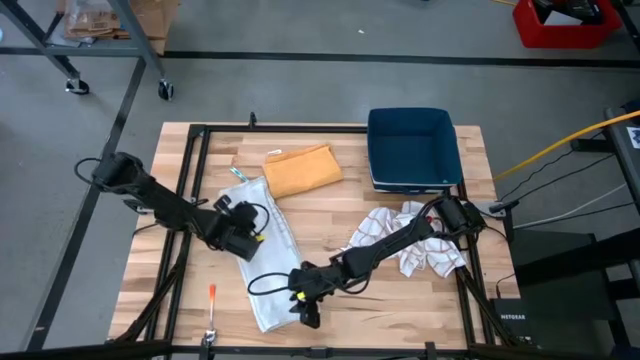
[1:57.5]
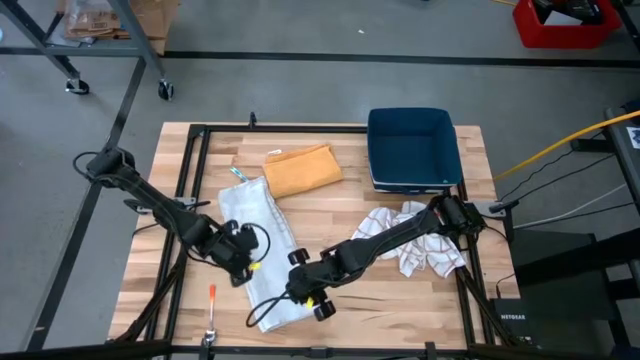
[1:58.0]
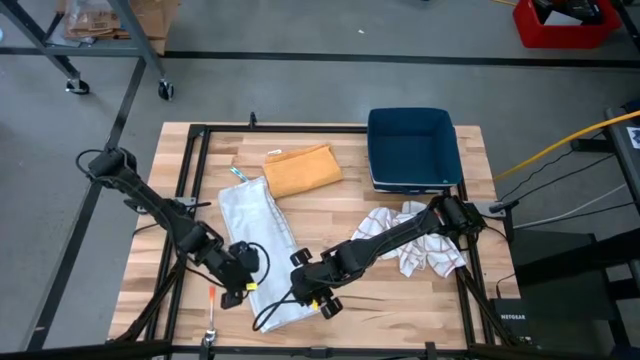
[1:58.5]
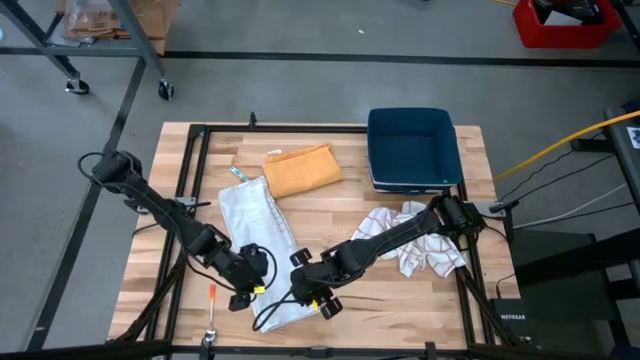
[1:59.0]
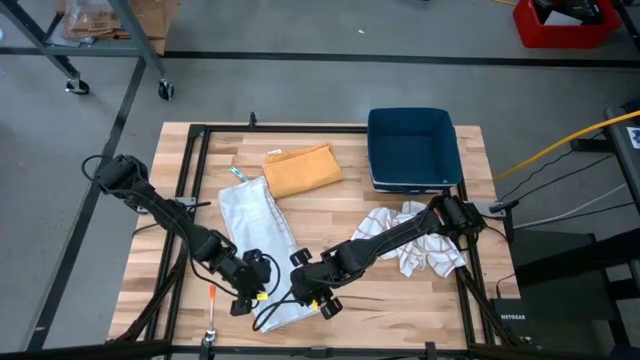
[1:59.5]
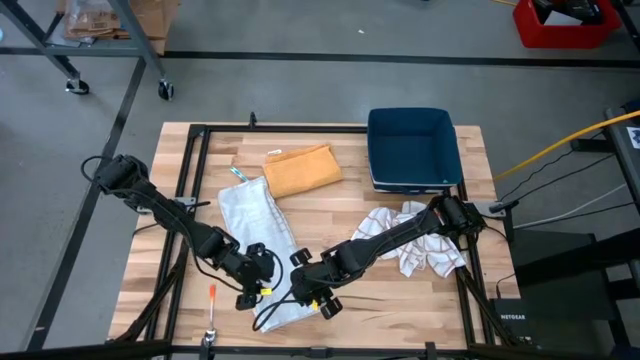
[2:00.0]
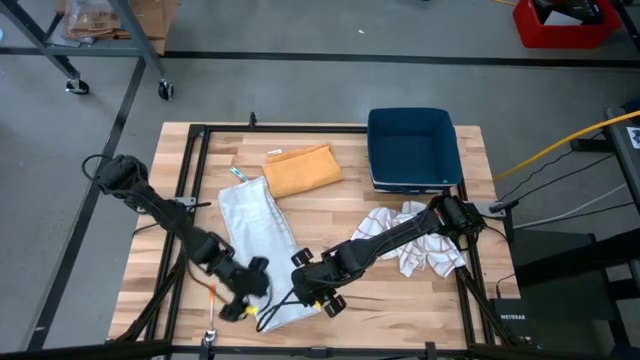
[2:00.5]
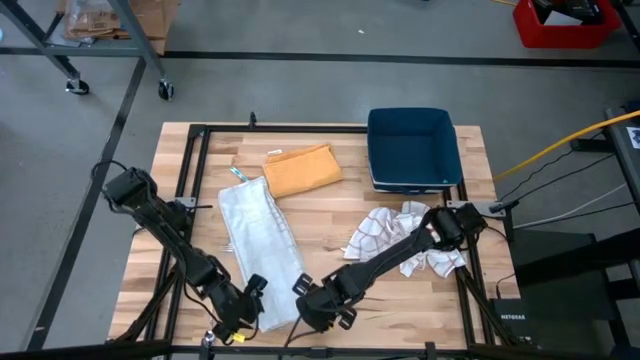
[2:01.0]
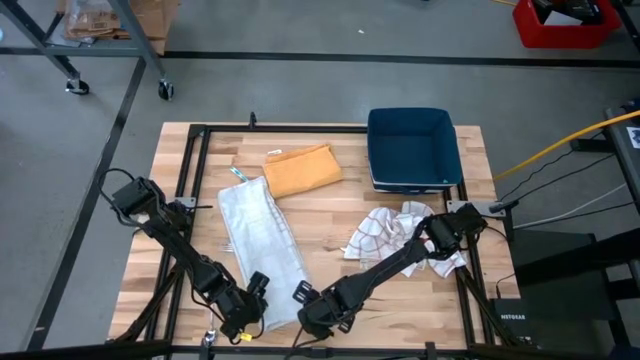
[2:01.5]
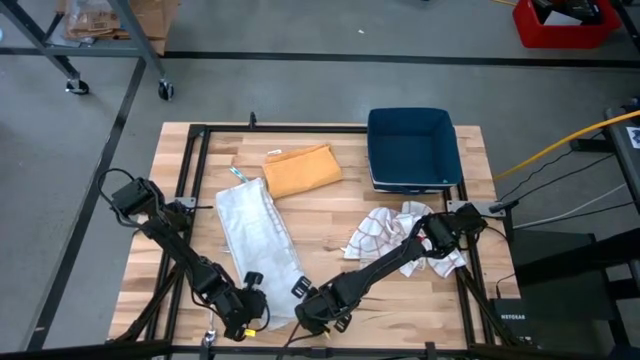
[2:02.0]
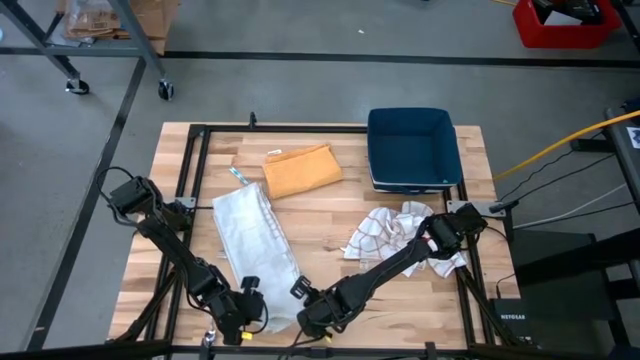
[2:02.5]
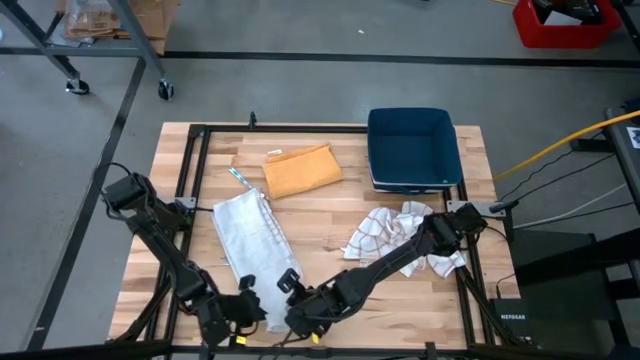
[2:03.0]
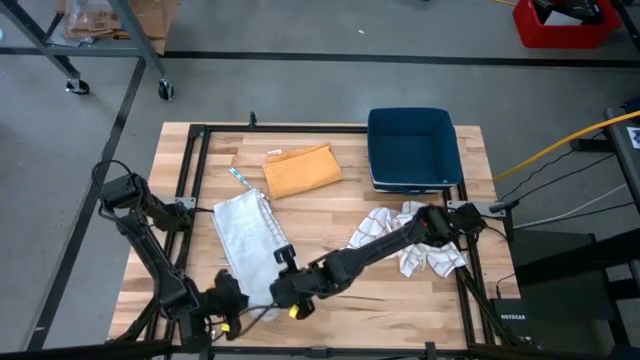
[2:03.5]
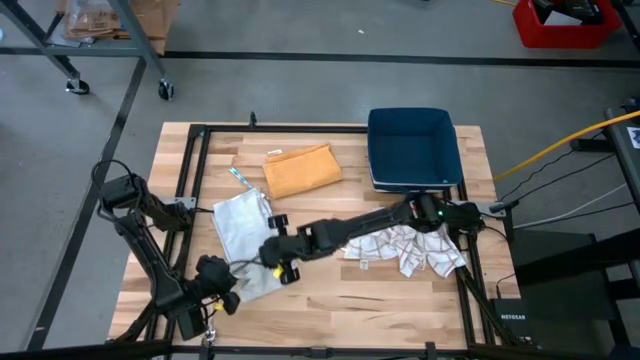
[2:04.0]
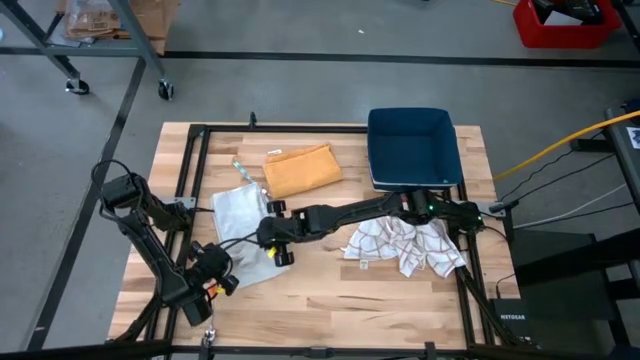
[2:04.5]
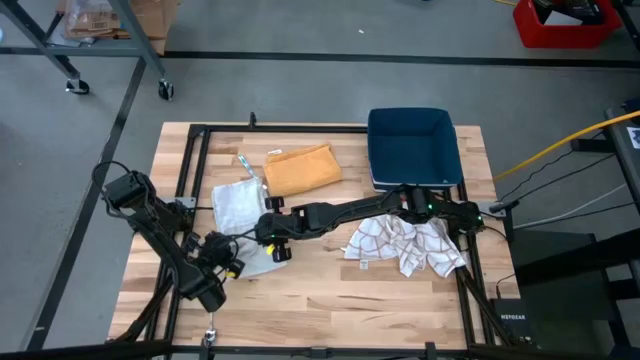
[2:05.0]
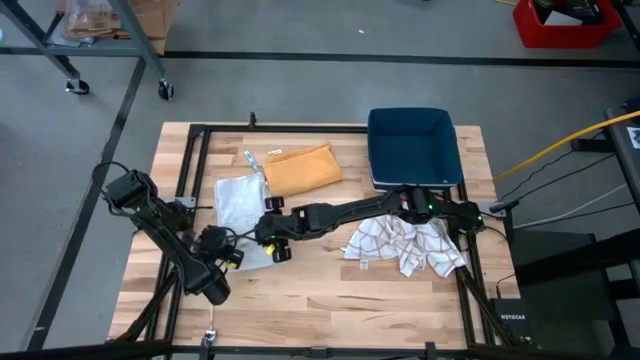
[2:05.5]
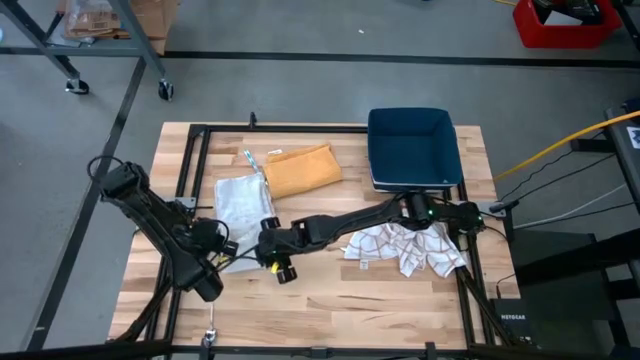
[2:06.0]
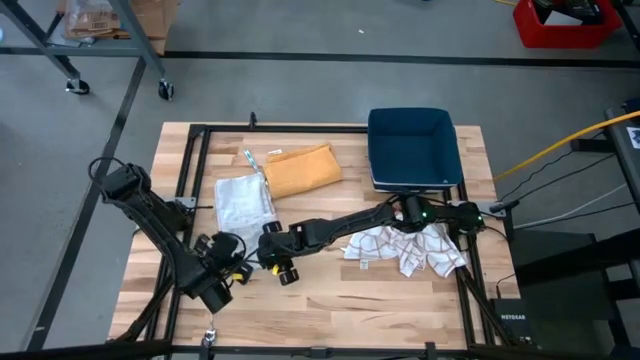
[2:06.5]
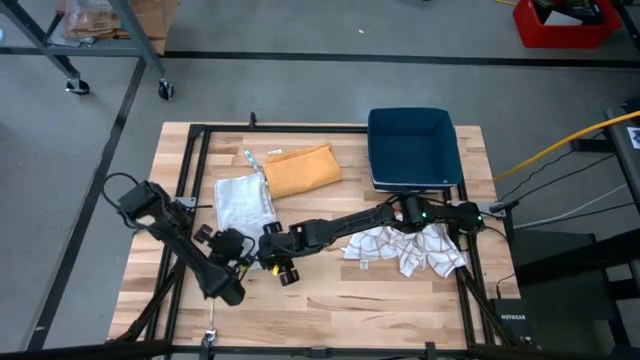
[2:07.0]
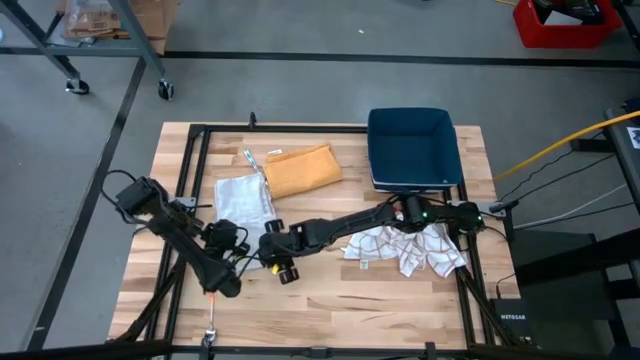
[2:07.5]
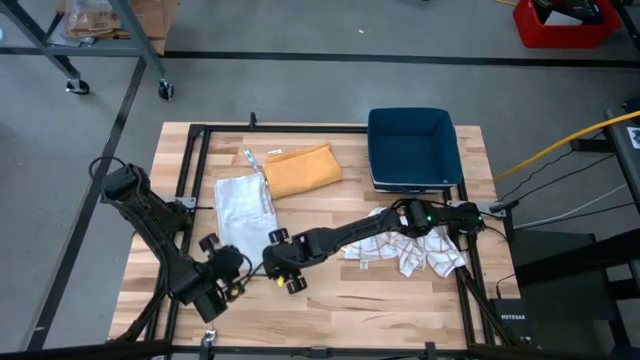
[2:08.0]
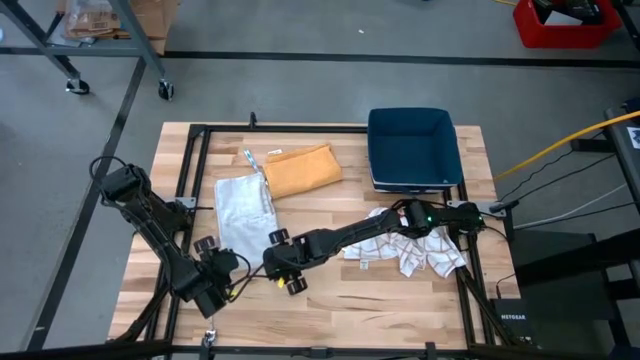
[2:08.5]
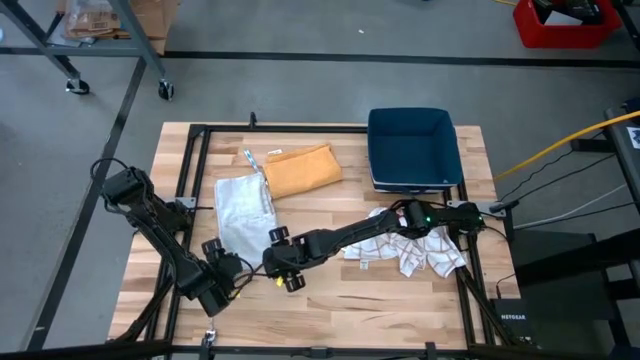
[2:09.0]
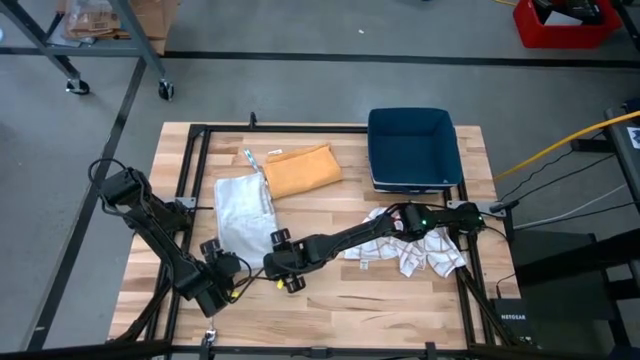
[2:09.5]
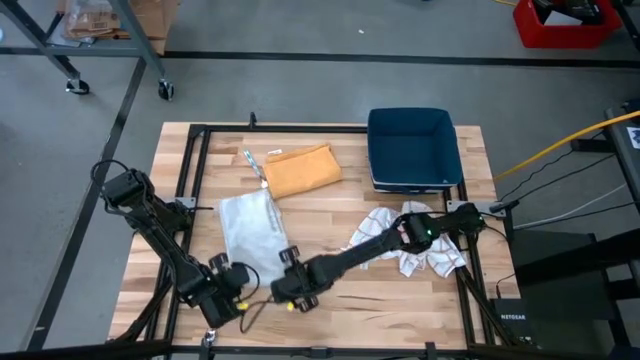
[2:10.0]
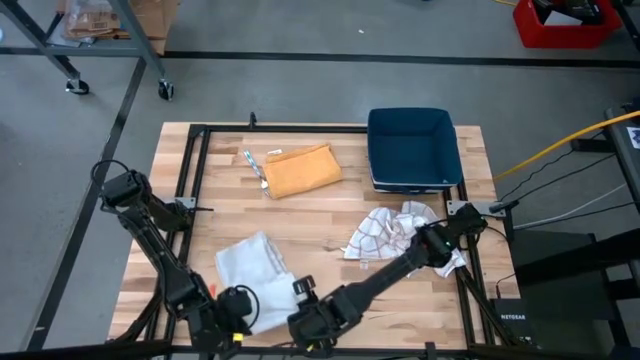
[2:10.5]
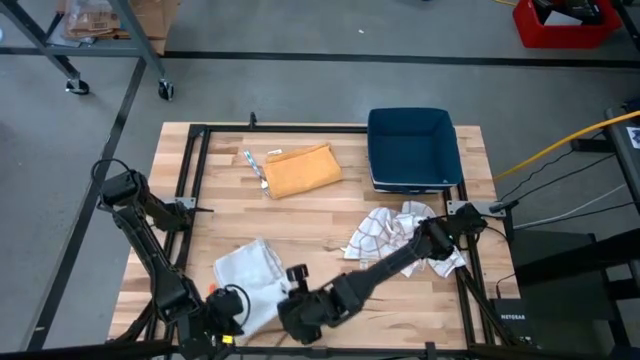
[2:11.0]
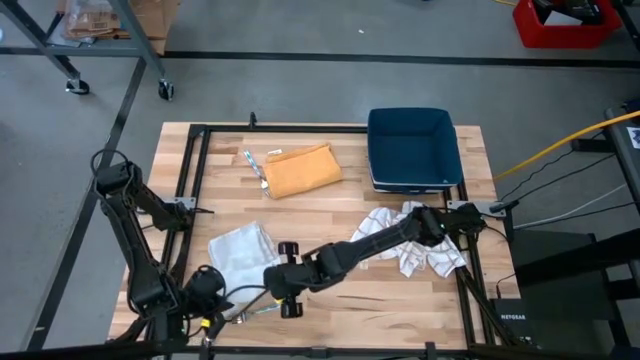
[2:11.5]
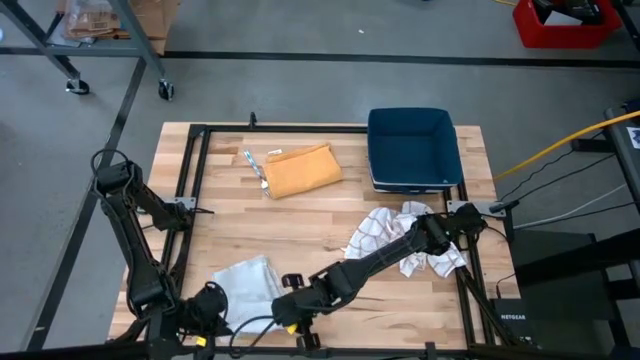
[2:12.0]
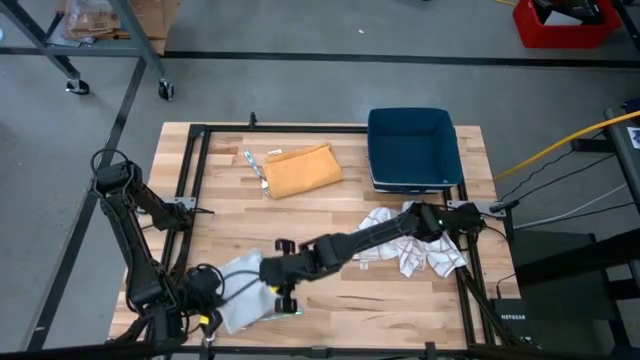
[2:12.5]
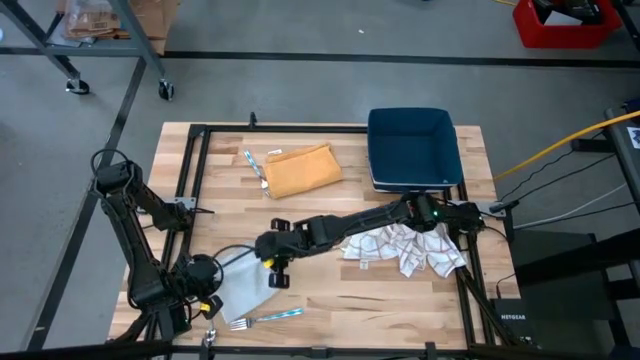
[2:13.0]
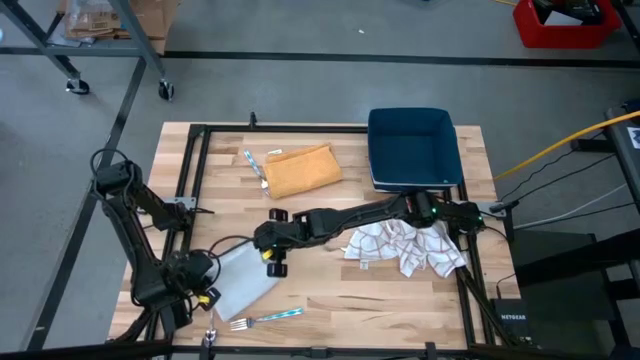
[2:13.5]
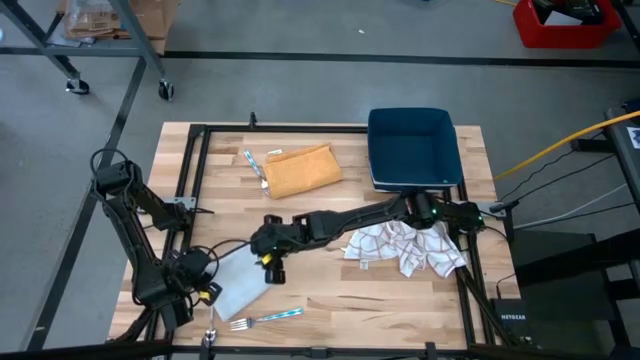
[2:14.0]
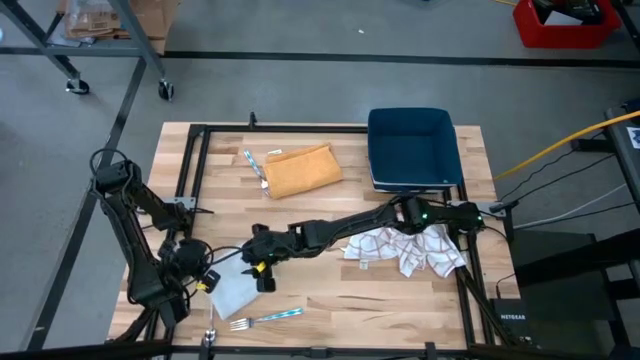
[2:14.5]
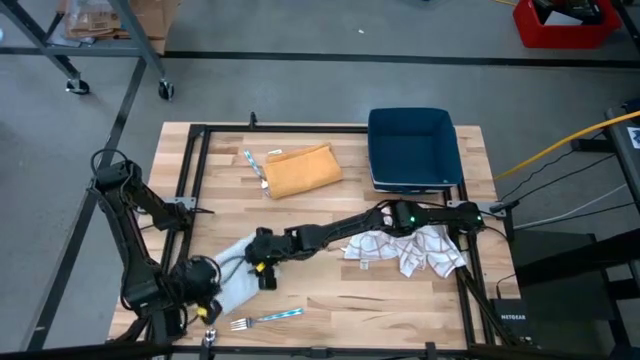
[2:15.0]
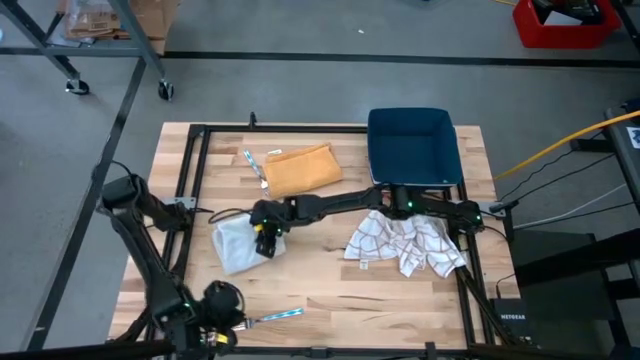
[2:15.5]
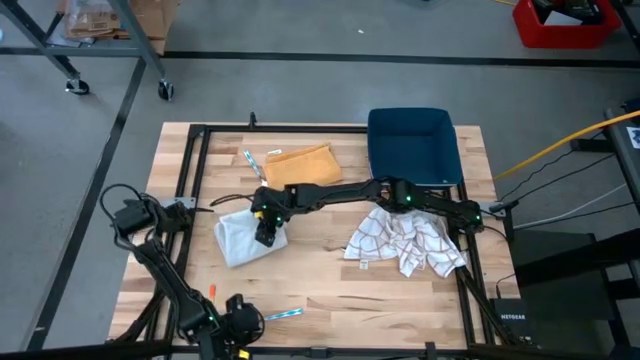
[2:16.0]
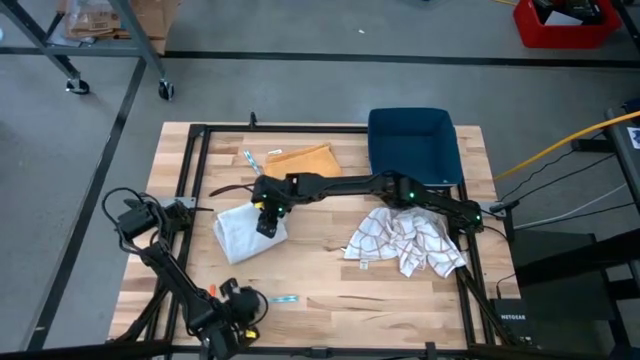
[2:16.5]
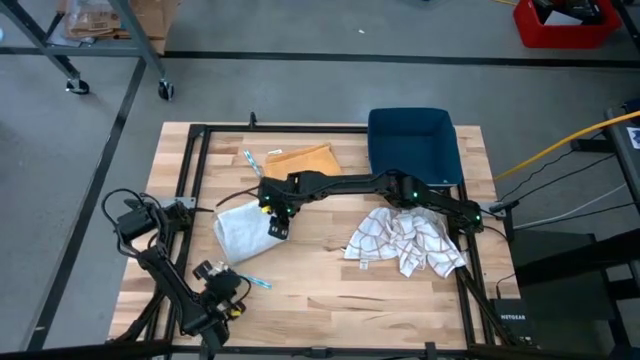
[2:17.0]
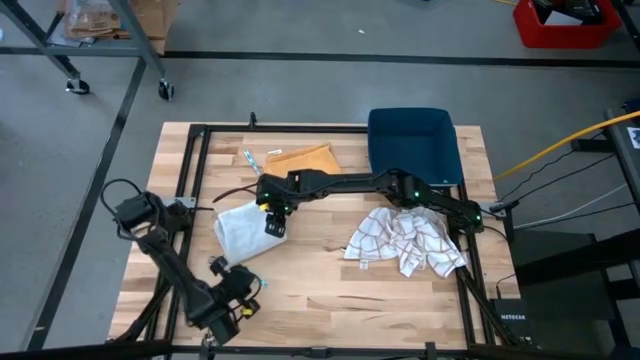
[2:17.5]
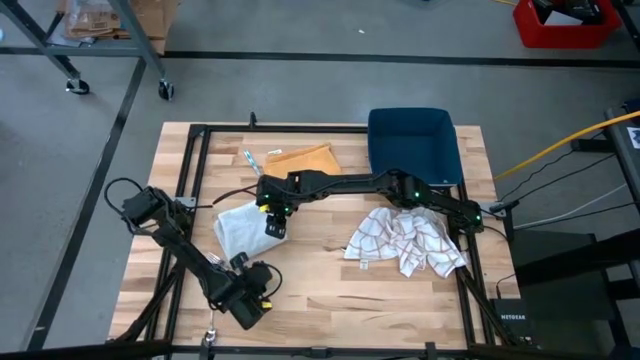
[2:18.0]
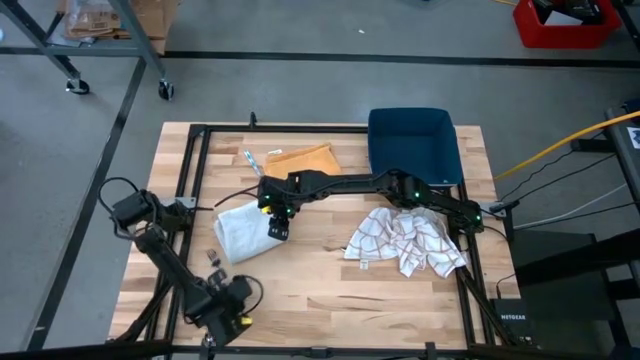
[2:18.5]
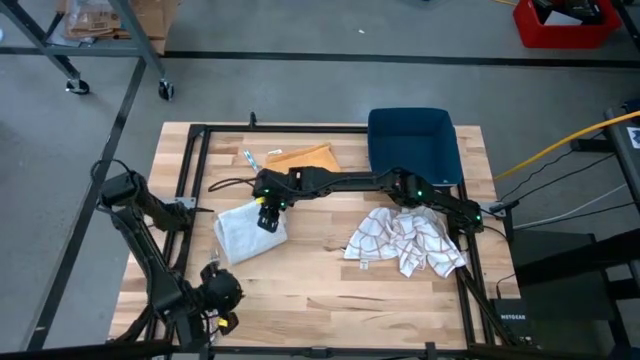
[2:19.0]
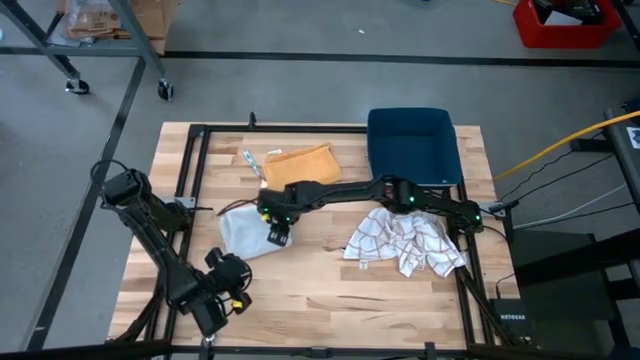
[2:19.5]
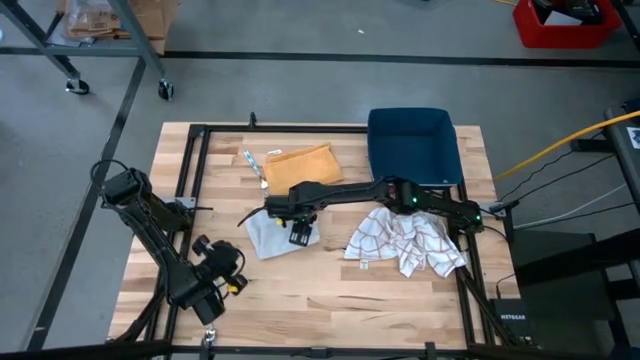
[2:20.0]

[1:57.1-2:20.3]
Task: Fold towel
Fold the left white towel
